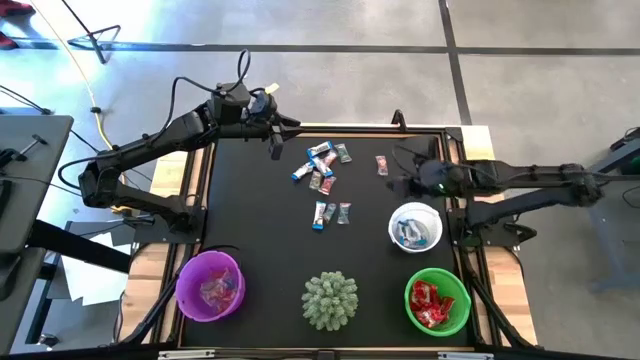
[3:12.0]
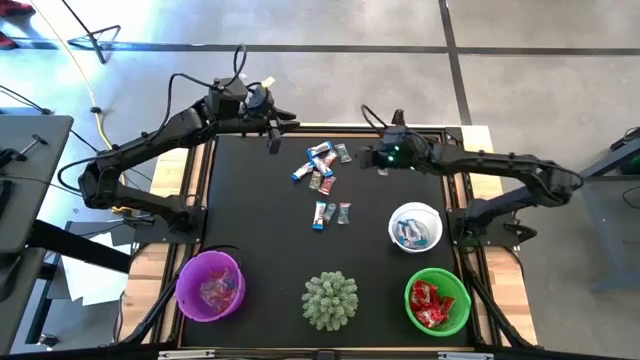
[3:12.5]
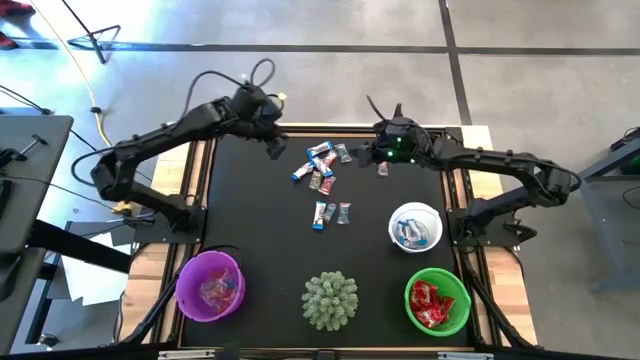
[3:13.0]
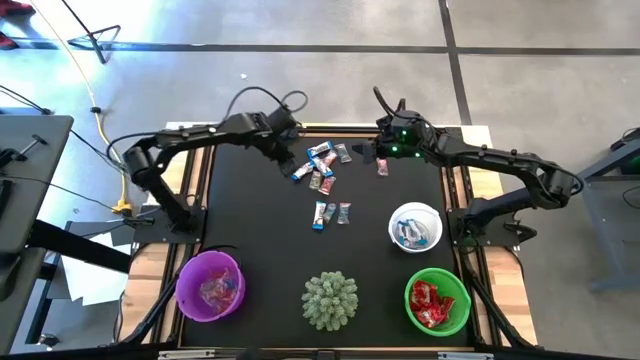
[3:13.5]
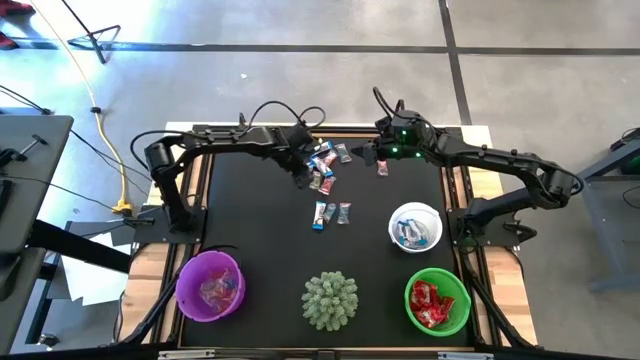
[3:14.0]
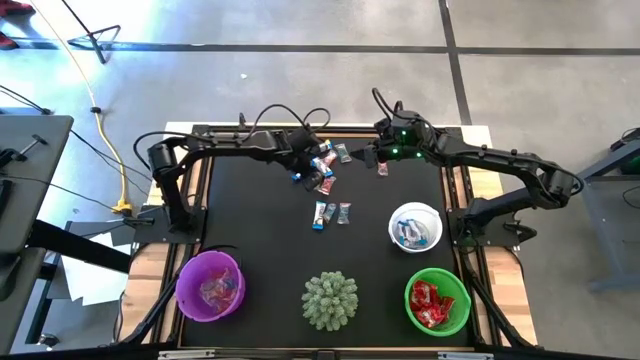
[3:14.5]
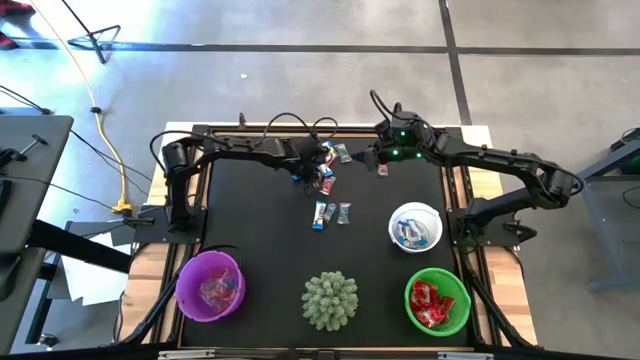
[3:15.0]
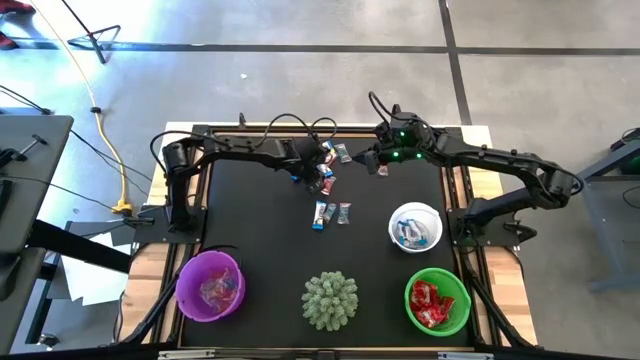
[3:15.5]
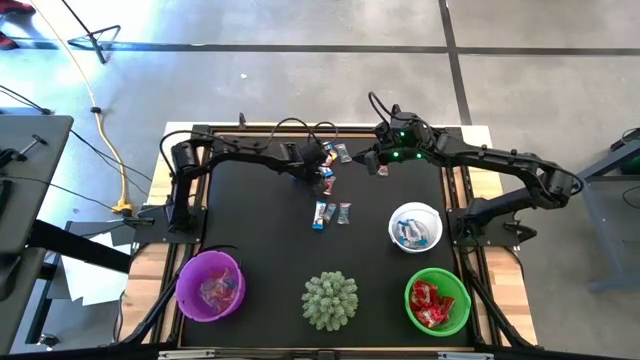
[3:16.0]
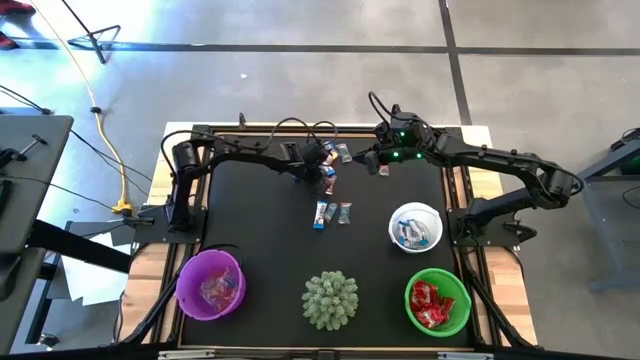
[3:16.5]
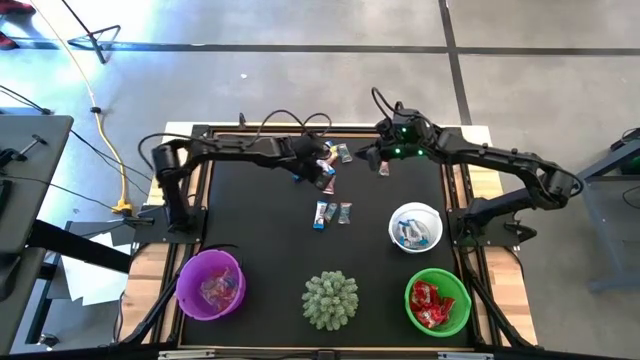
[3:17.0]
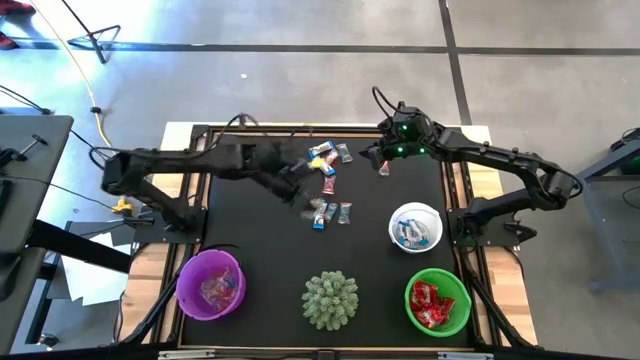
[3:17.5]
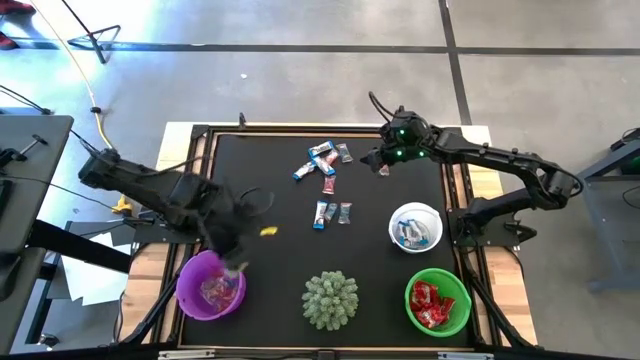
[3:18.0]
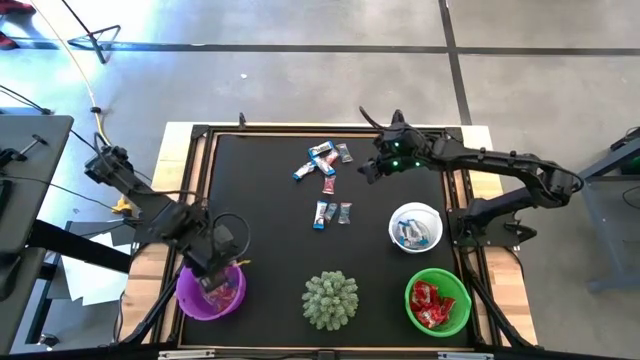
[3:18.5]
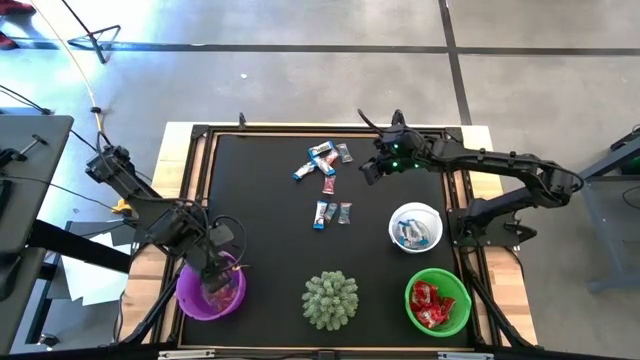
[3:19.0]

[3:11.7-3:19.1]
Task: Sort candy
Put the transparent candy wrapper into the purple bucket

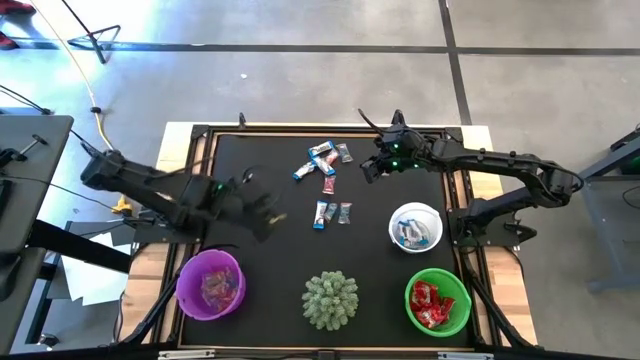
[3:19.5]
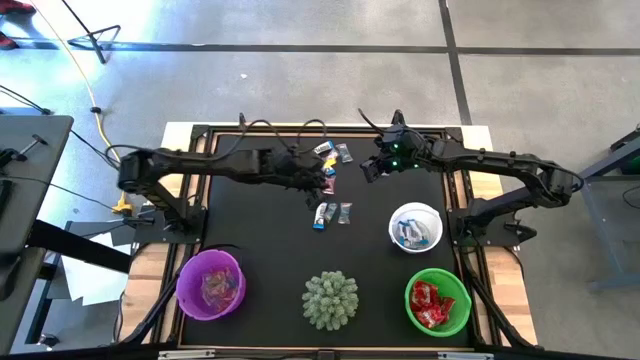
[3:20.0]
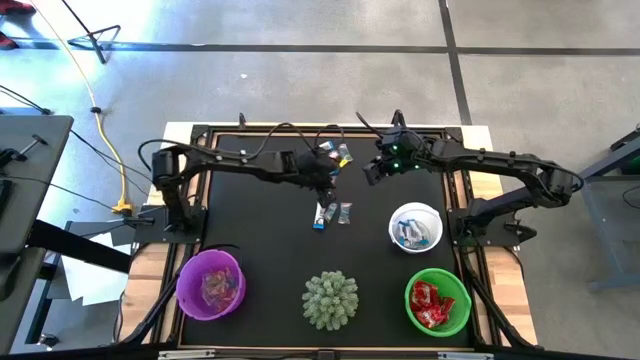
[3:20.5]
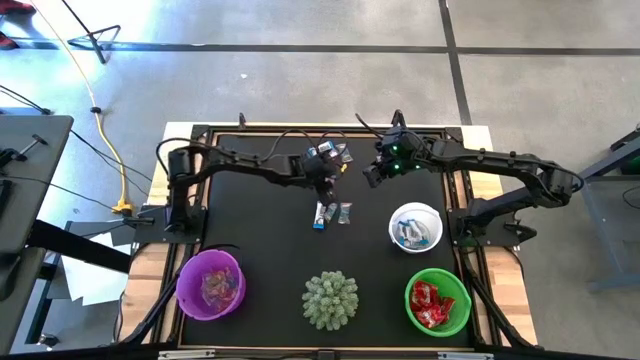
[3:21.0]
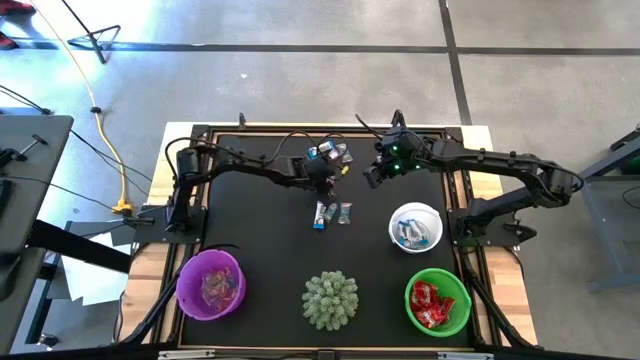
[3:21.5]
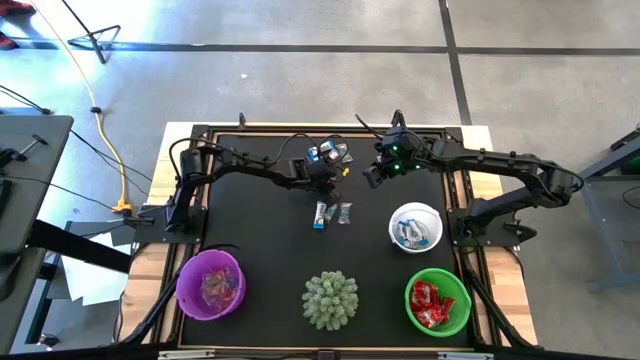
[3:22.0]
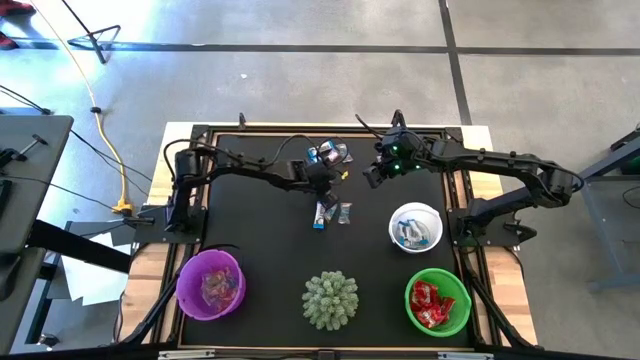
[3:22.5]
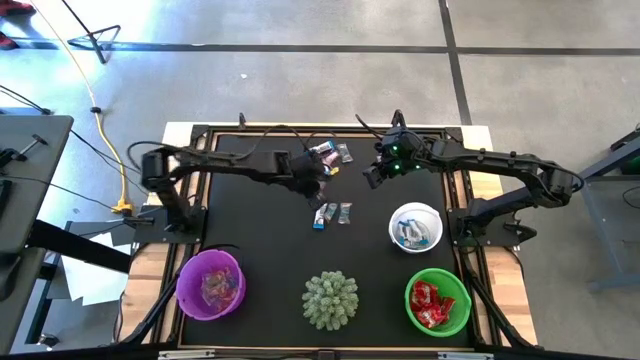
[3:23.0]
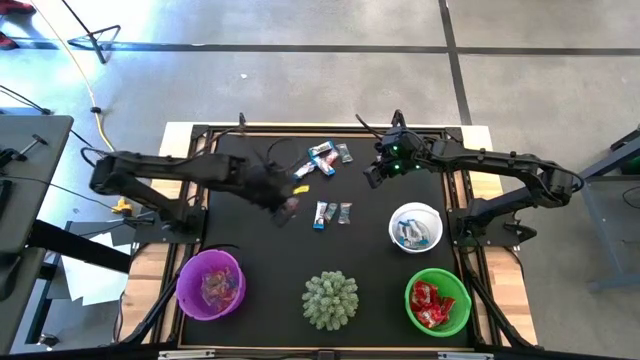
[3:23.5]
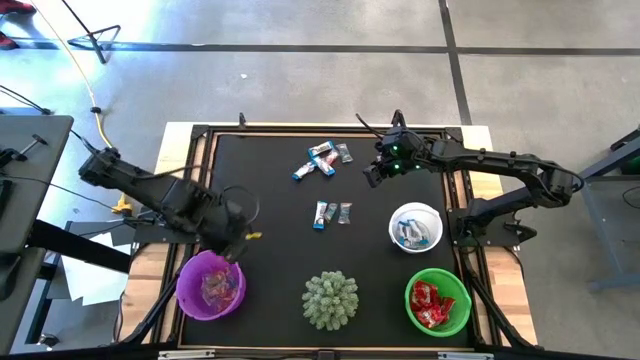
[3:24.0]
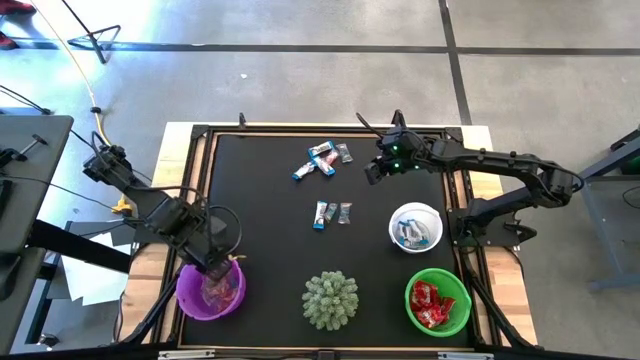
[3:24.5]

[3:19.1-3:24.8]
Put the transparent candy wrapper into the purple bucket

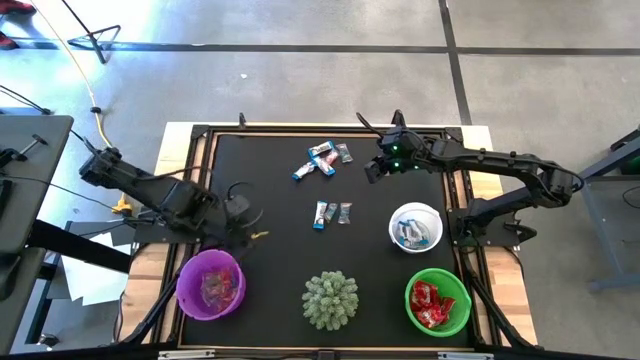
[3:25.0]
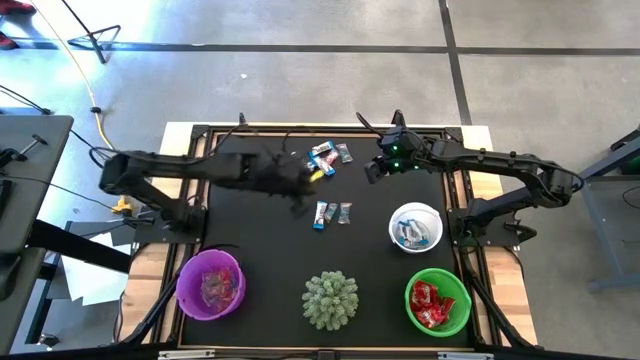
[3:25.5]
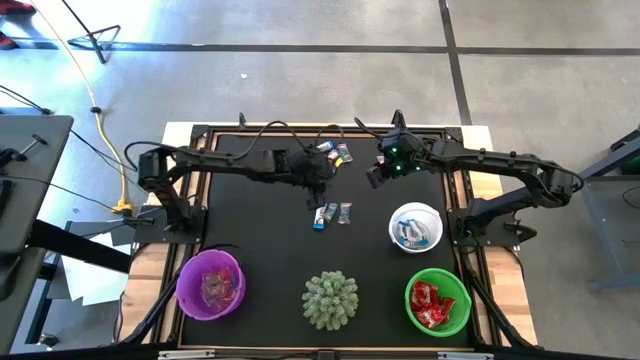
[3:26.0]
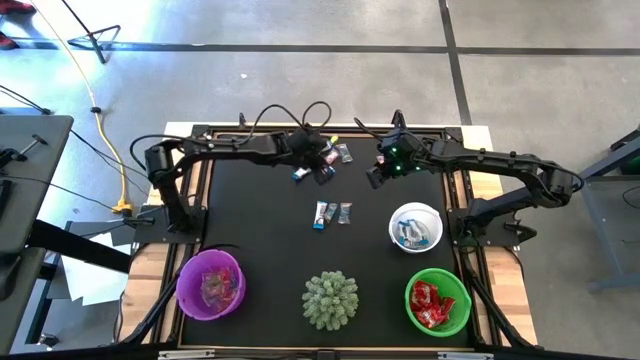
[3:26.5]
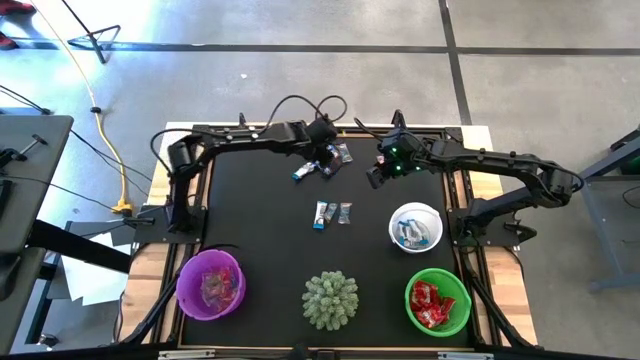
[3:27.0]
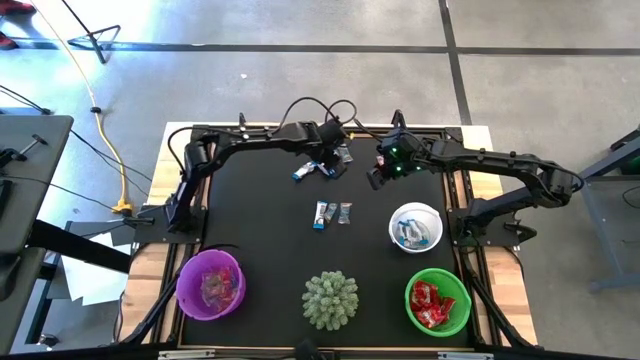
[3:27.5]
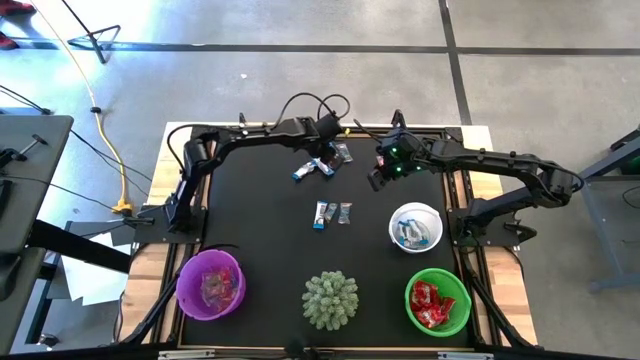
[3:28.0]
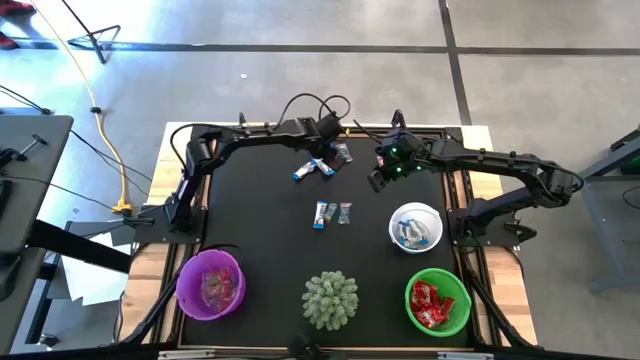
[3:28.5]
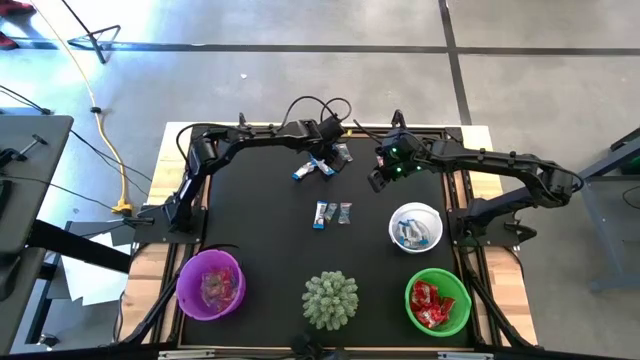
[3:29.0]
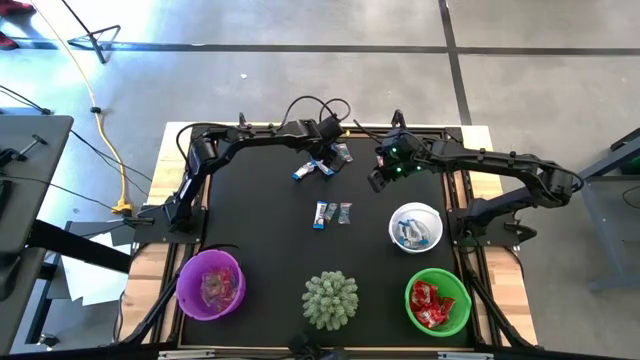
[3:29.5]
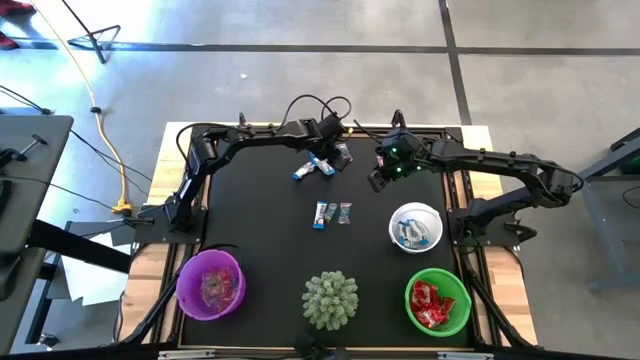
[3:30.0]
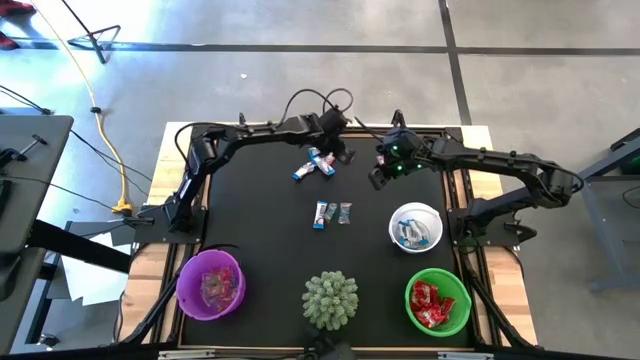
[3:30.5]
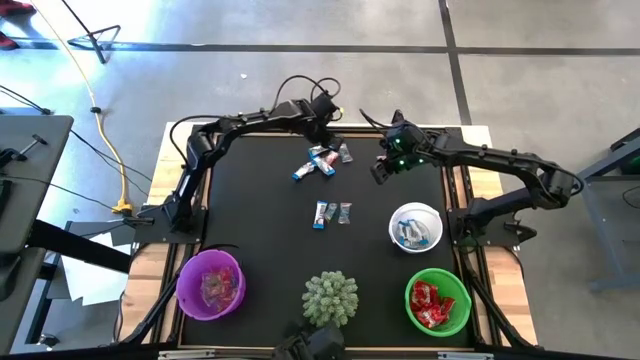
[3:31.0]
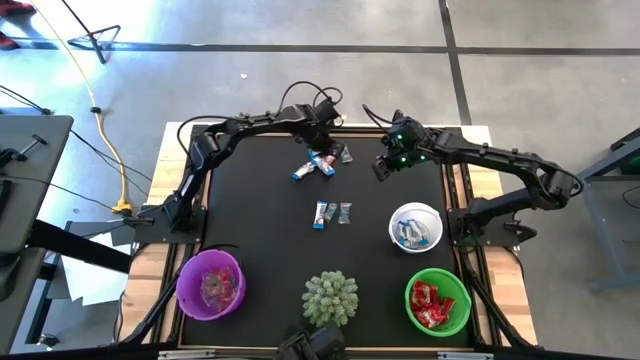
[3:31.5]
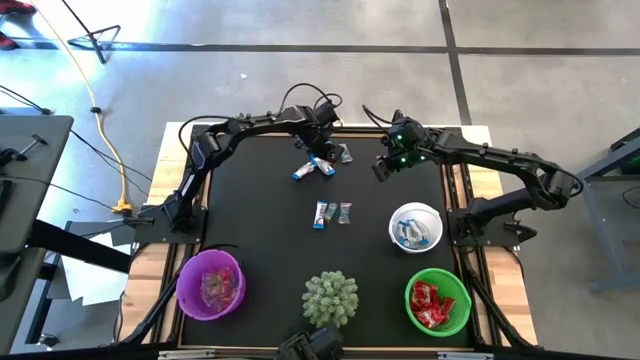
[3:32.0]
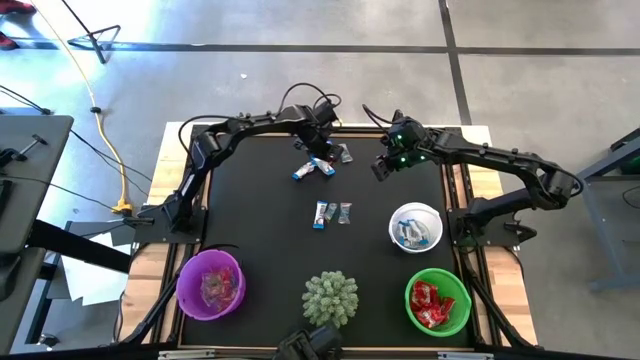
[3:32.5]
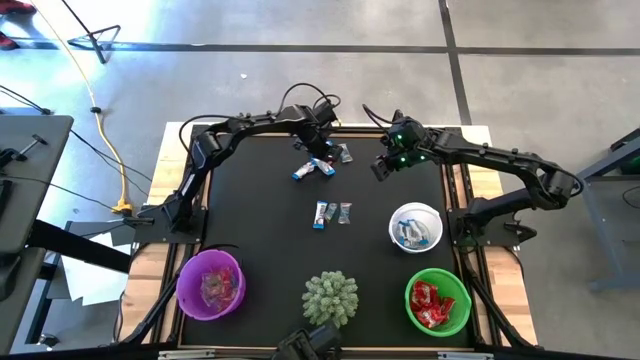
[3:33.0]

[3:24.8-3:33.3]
Put the transparent candy wrapper into the purple bucket
